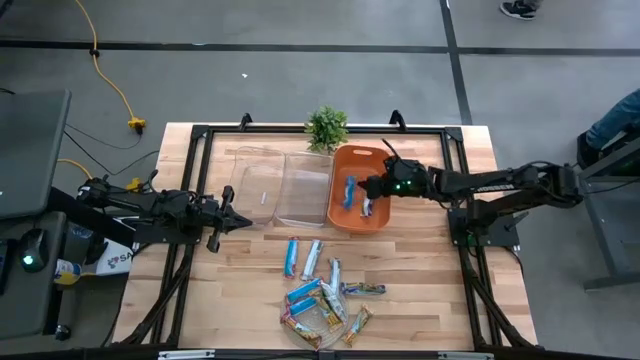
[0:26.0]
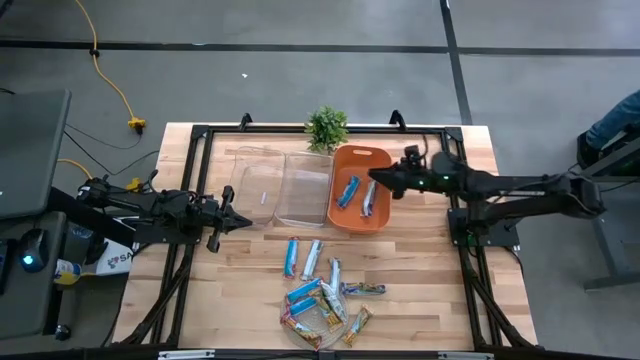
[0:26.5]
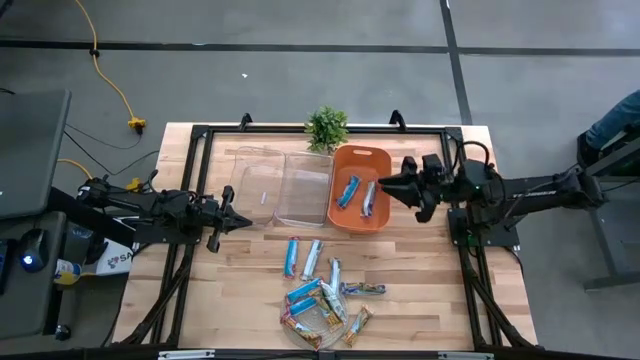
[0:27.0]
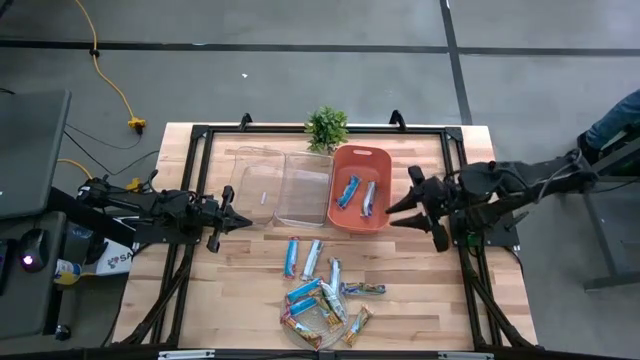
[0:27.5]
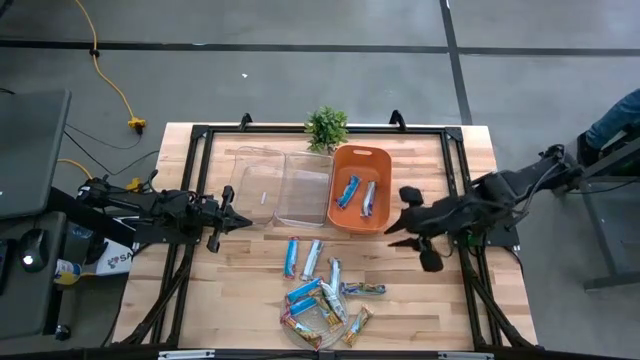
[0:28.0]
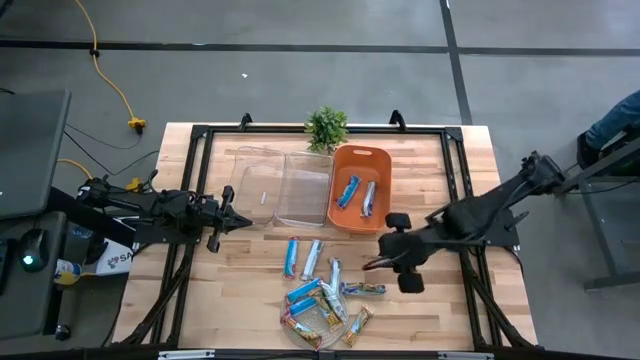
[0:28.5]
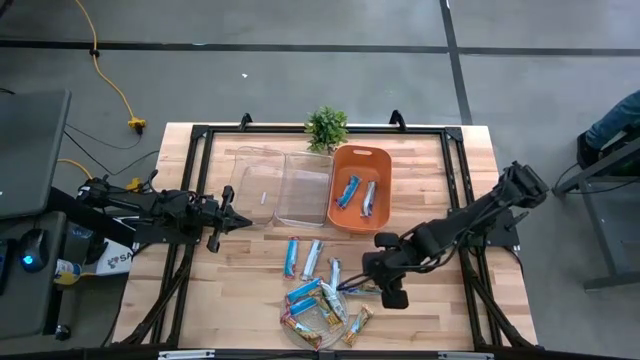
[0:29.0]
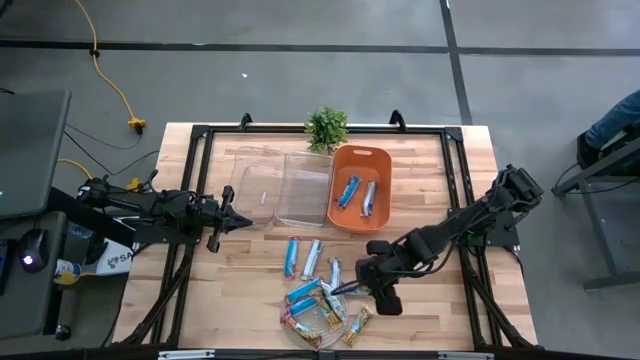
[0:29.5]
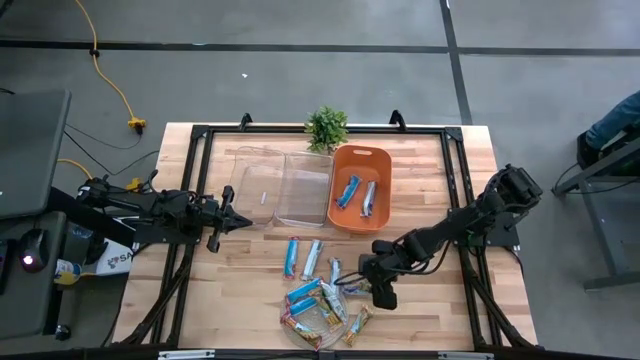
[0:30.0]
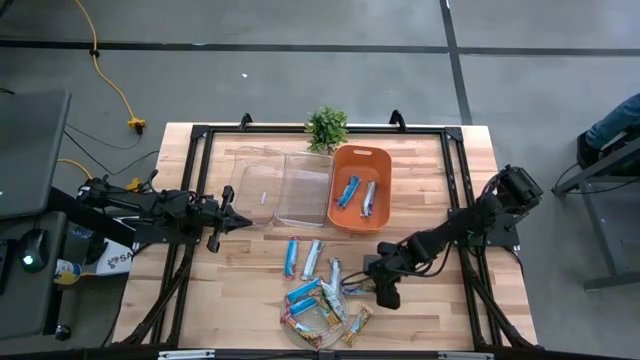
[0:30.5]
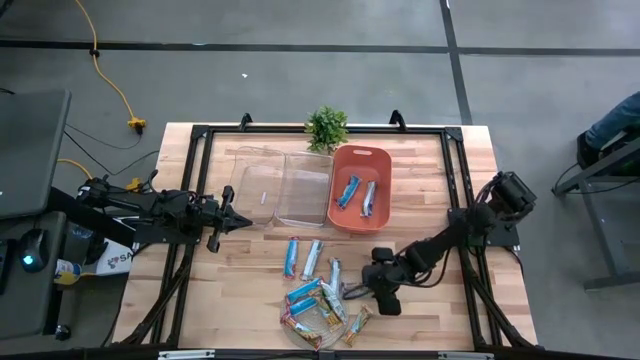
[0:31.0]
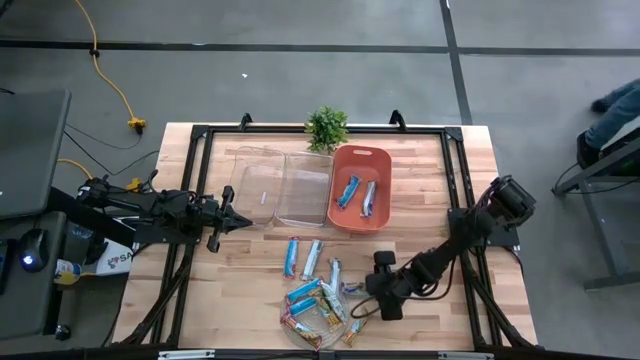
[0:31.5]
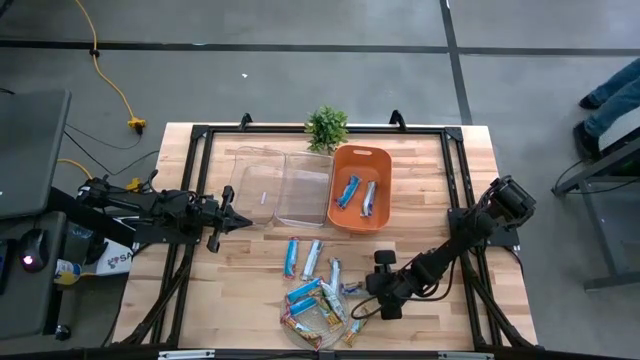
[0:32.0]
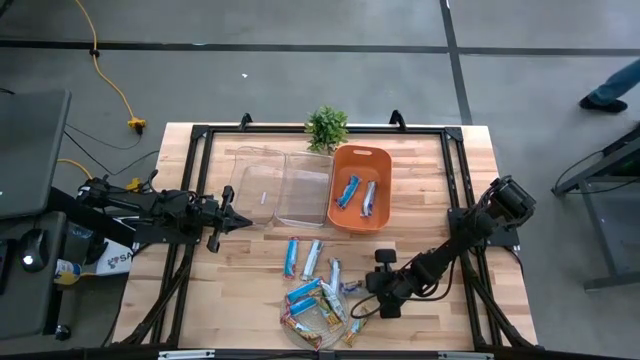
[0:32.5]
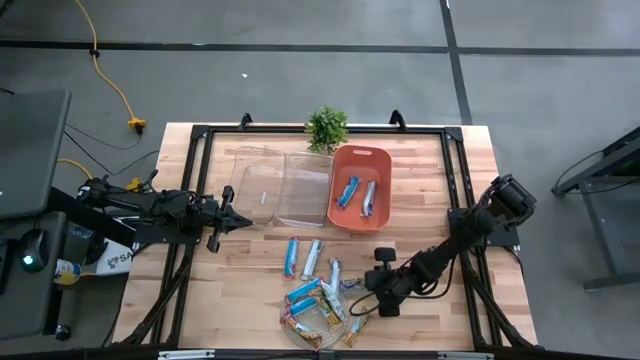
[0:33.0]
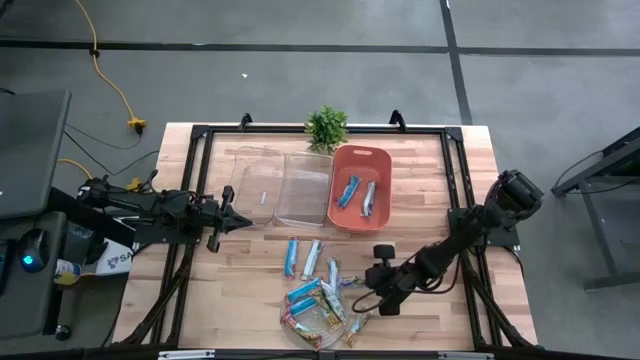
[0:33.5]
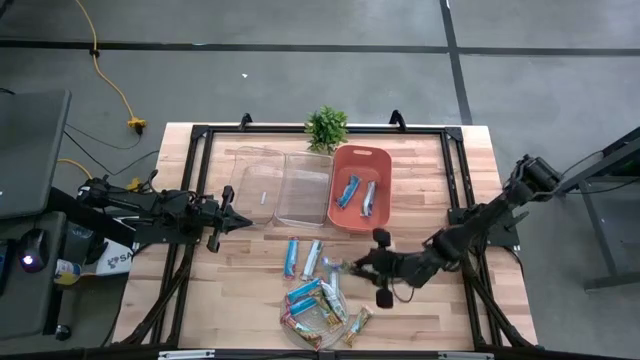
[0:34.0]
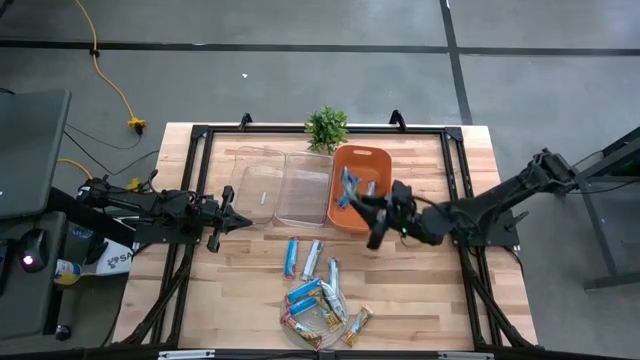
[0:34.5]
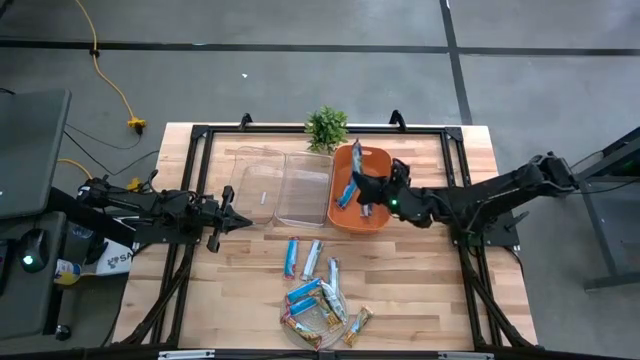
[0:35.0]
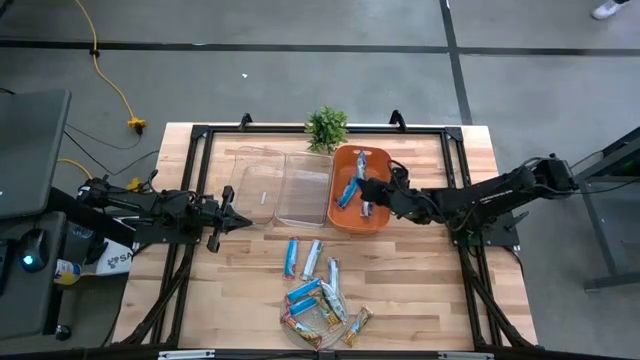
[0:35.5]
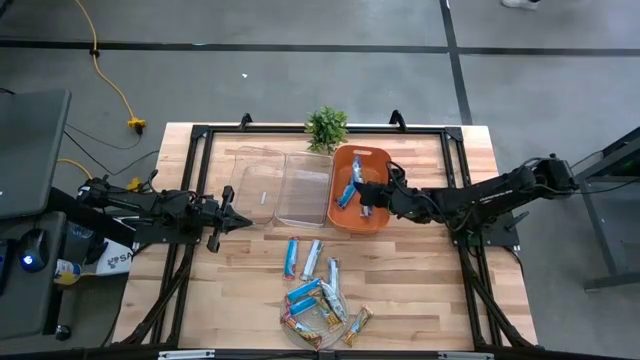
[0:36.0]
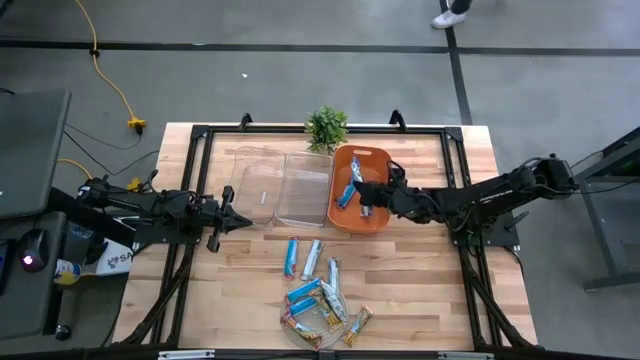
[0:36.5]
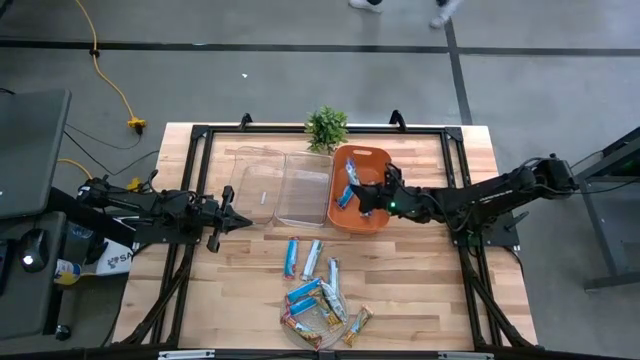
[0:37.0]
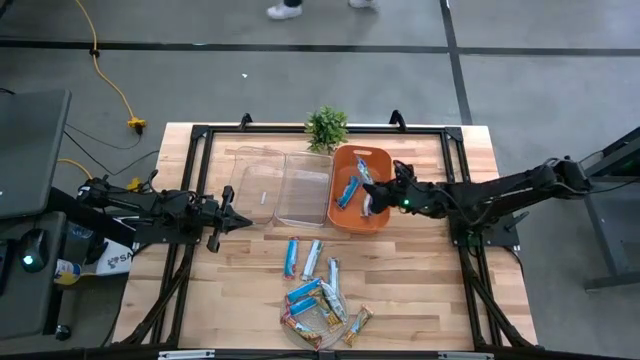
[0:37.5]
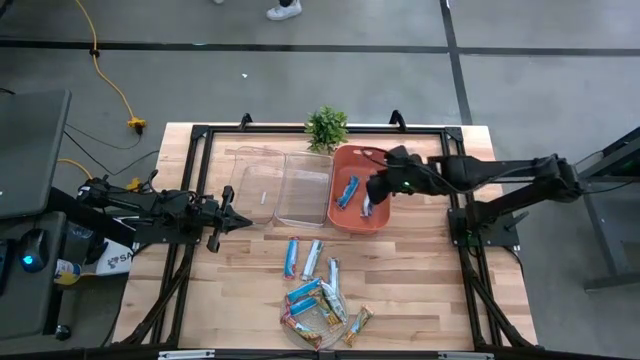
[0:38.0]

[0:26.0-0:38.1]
Task: Pick and place Granola Bars by type
Put the green granola bar into the orange bin

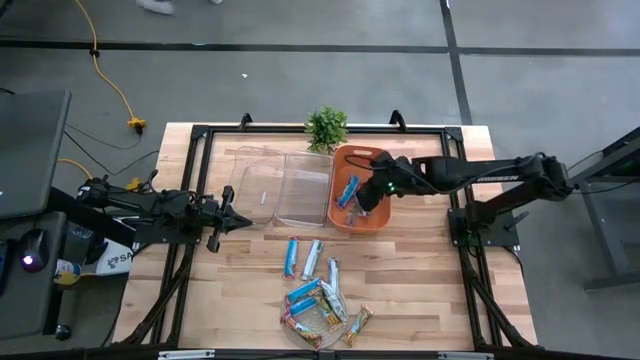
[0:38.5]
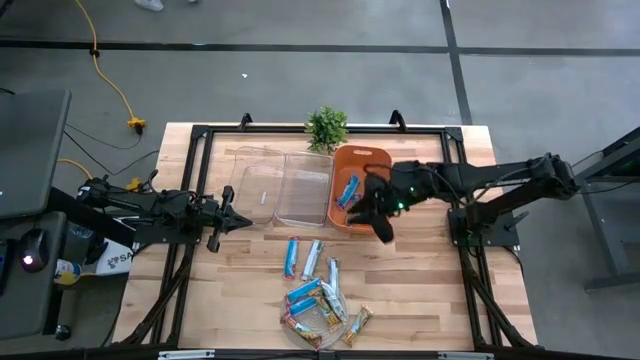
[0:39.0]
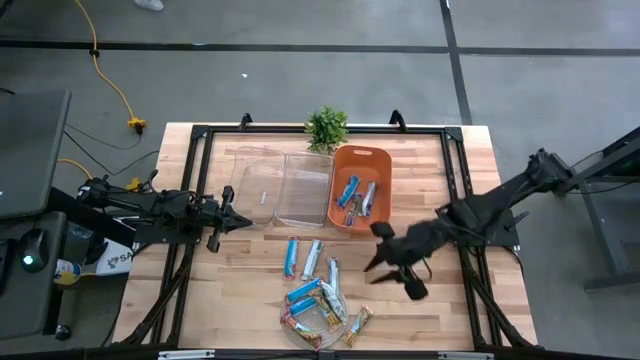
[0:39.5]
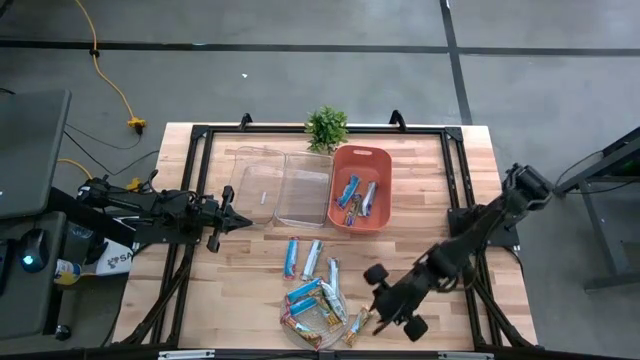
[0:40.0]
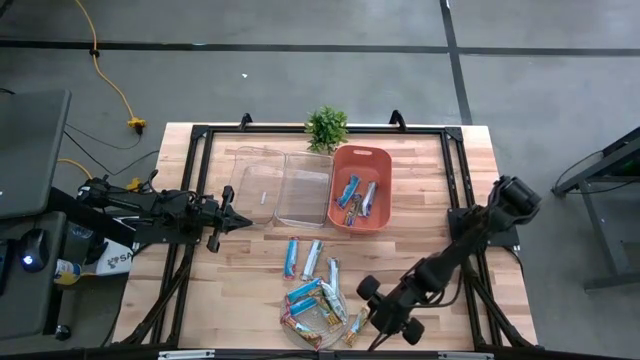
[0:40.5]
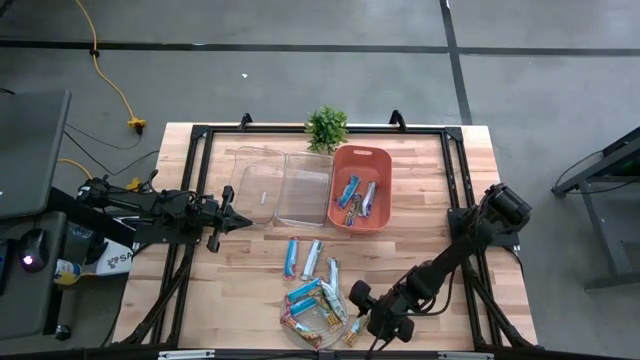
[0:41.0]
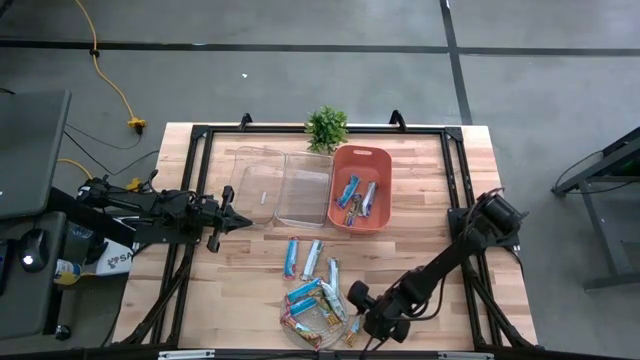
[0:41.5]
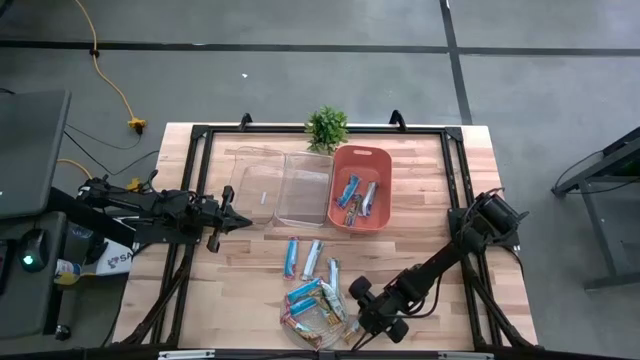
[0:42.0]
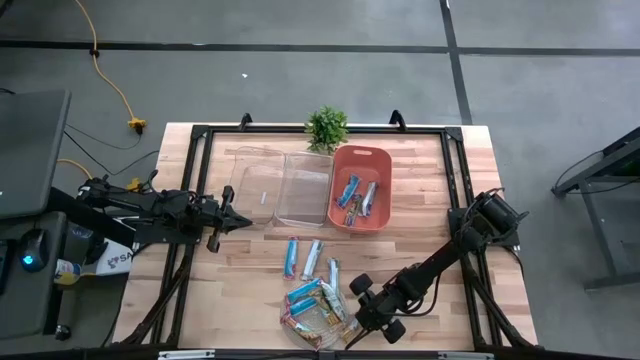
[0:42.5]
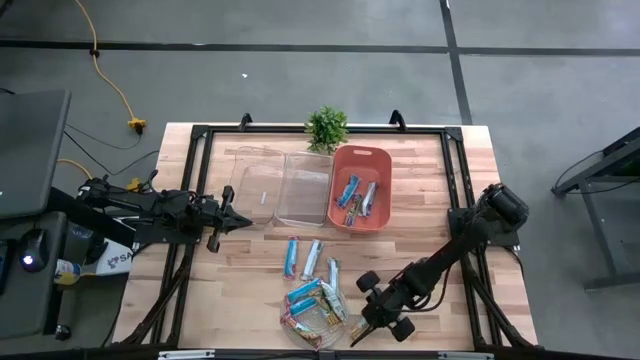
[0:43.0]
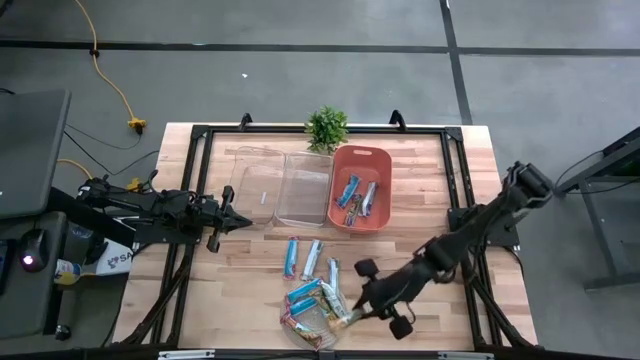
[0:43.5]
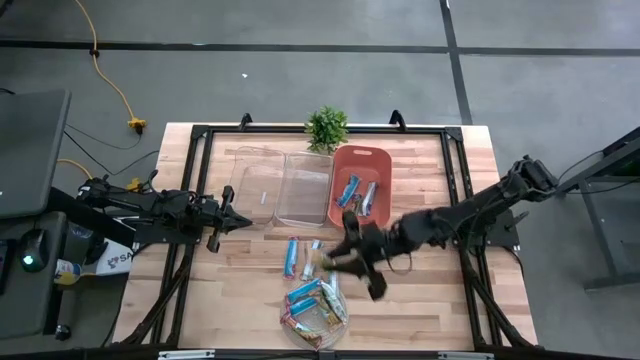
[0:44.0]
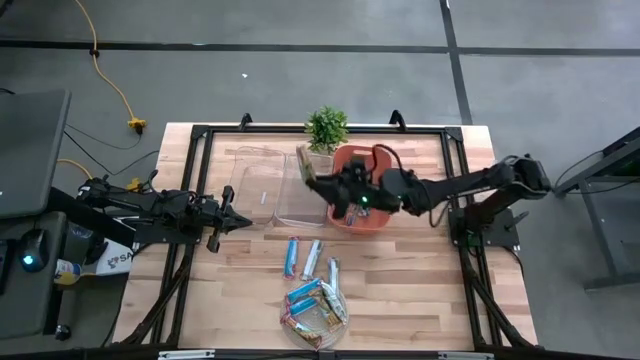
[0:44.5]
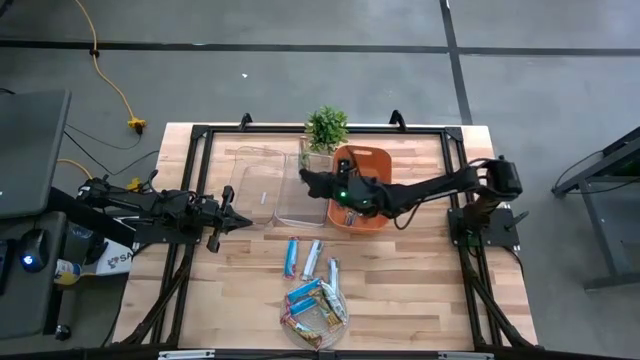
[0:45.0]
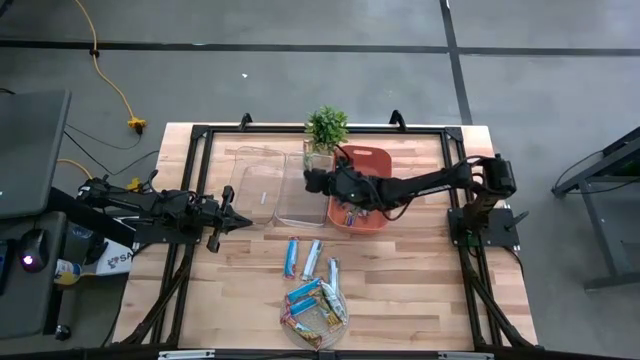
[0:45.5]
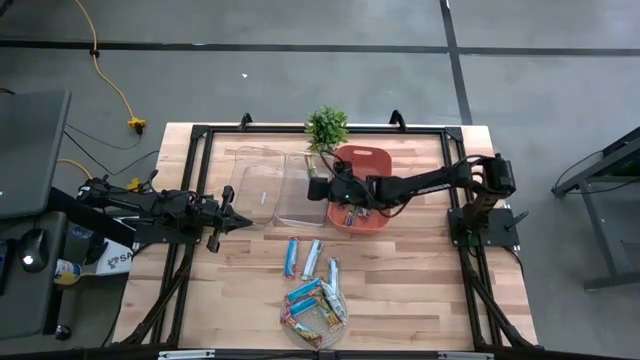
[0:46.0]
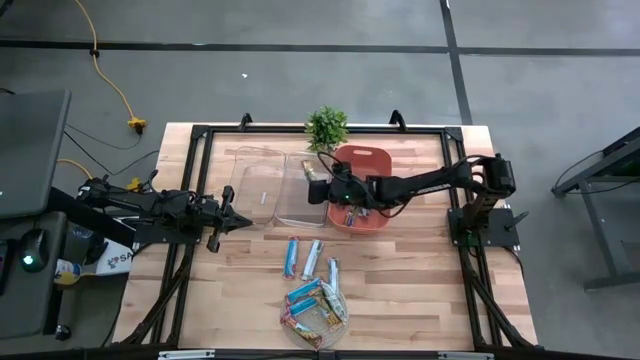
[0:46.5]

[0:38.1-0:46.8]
Put the yellow granola bar into the right transparent bin
